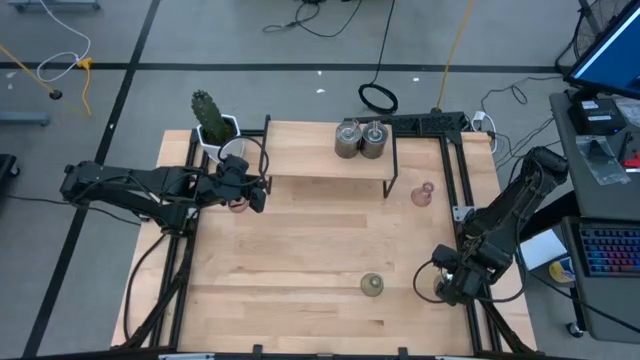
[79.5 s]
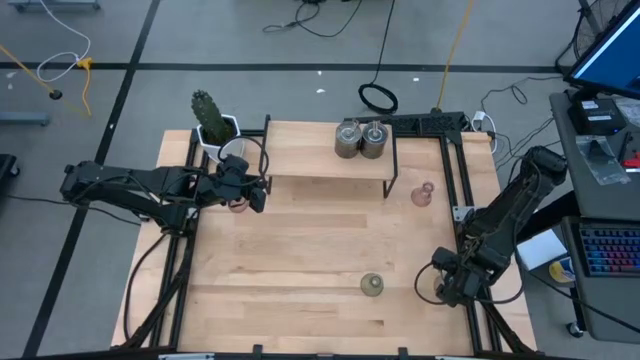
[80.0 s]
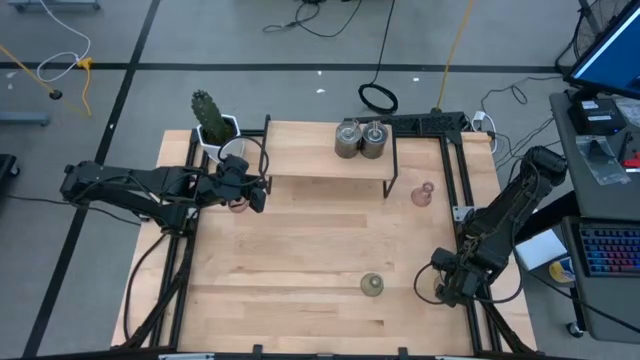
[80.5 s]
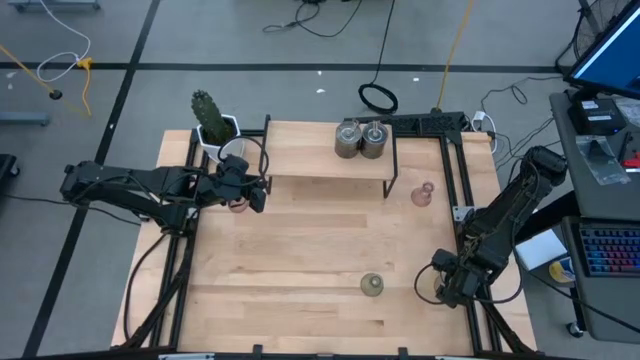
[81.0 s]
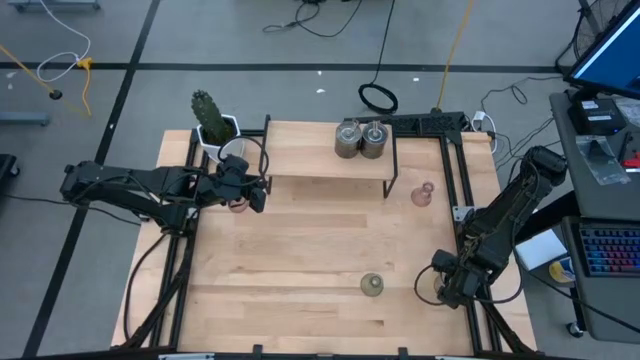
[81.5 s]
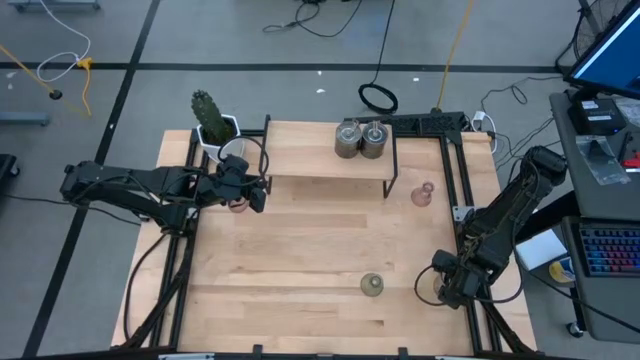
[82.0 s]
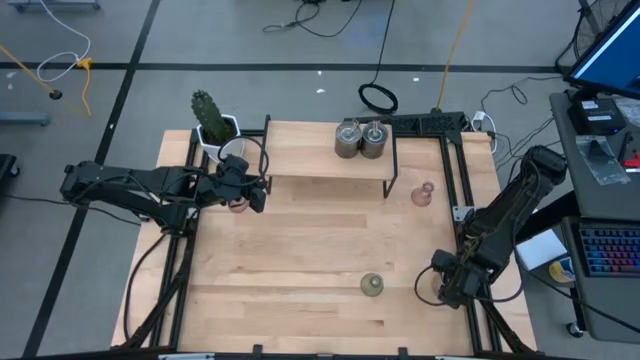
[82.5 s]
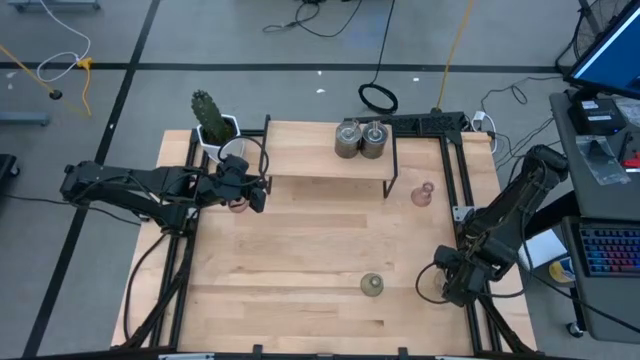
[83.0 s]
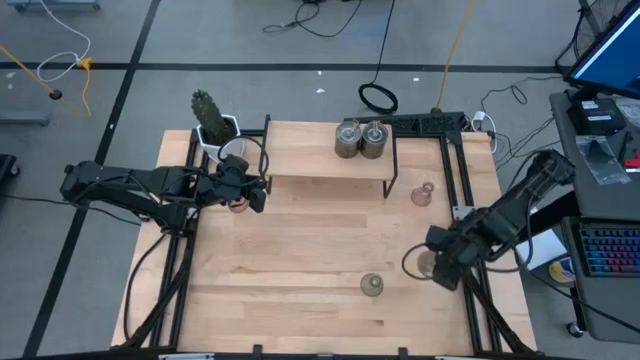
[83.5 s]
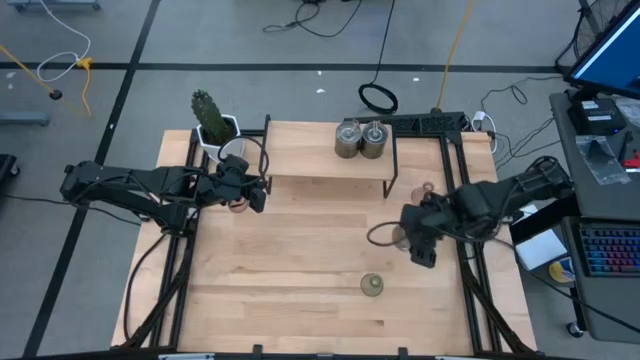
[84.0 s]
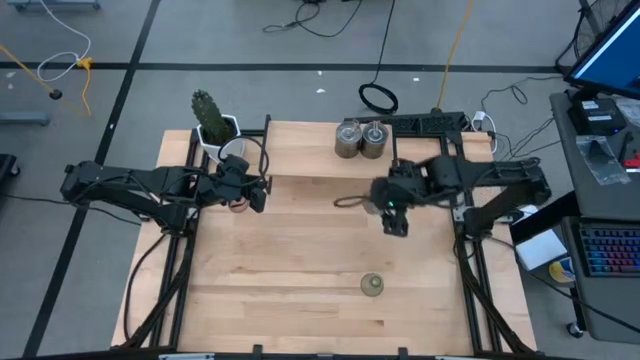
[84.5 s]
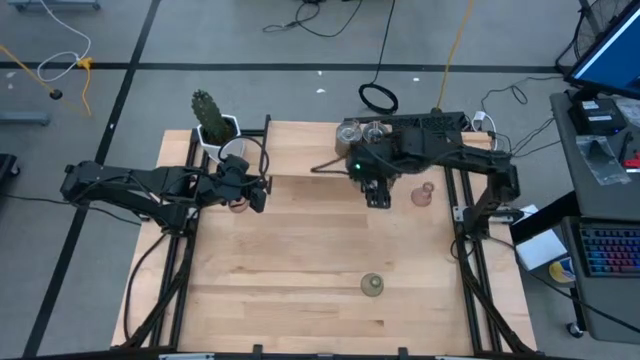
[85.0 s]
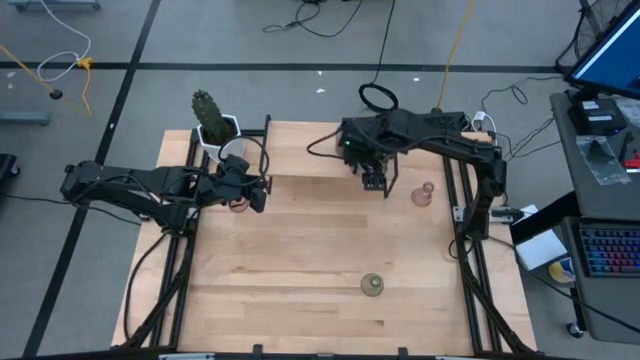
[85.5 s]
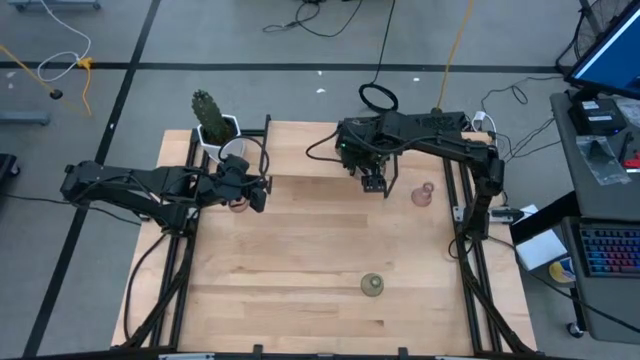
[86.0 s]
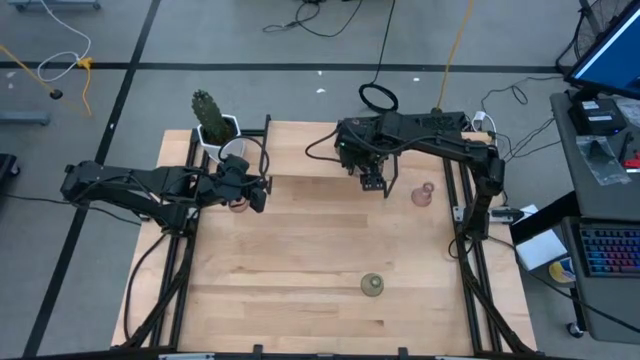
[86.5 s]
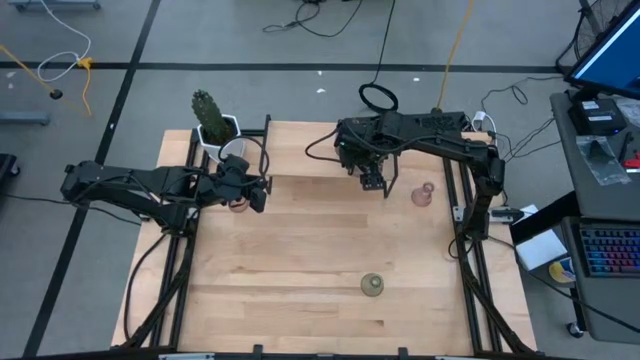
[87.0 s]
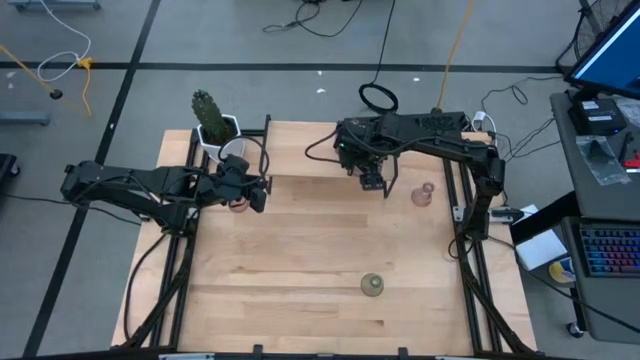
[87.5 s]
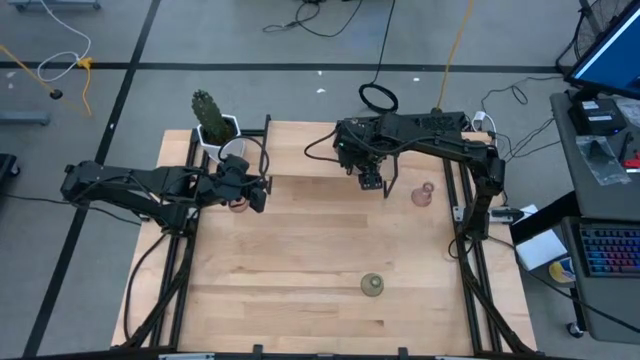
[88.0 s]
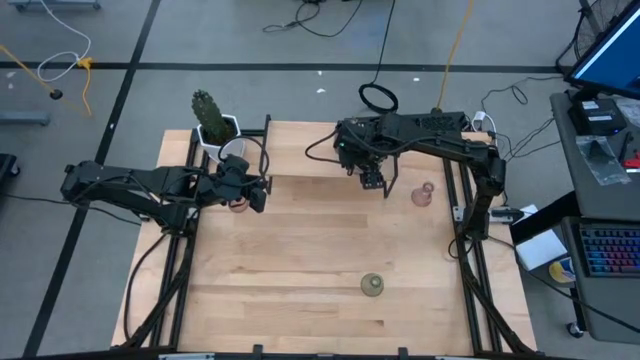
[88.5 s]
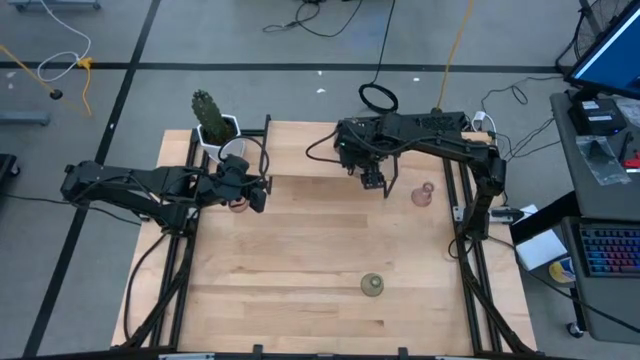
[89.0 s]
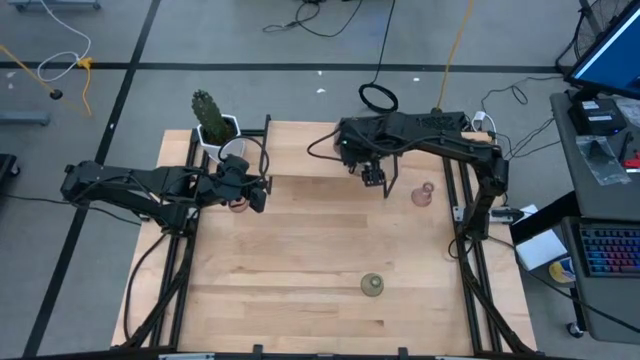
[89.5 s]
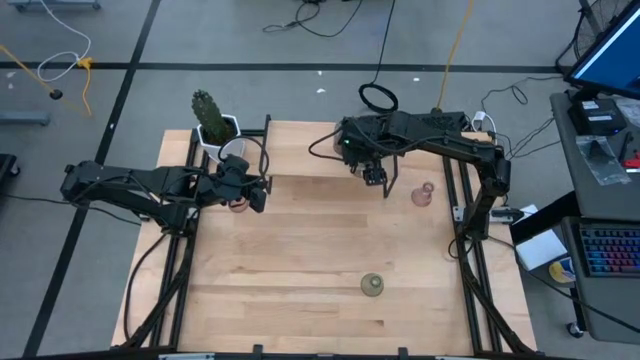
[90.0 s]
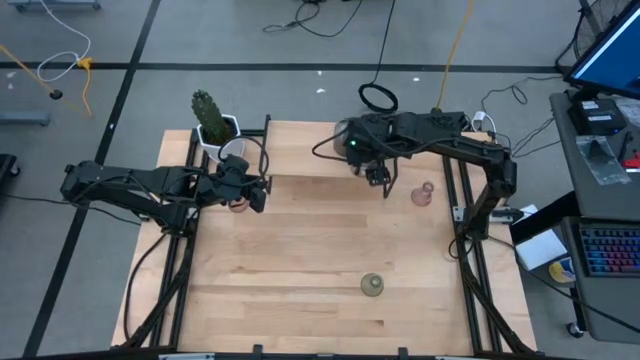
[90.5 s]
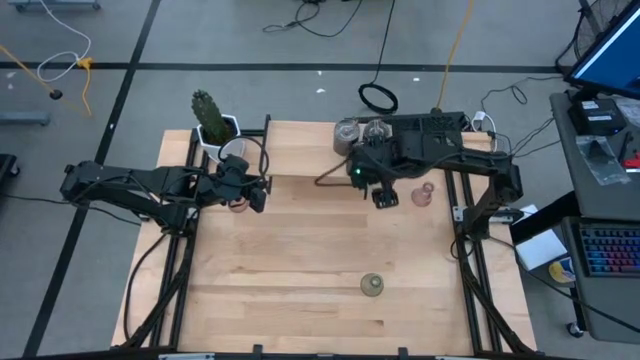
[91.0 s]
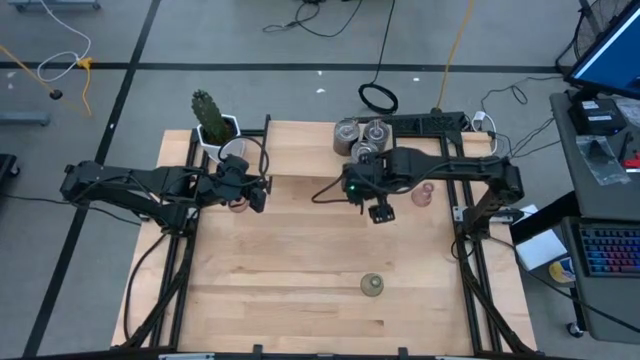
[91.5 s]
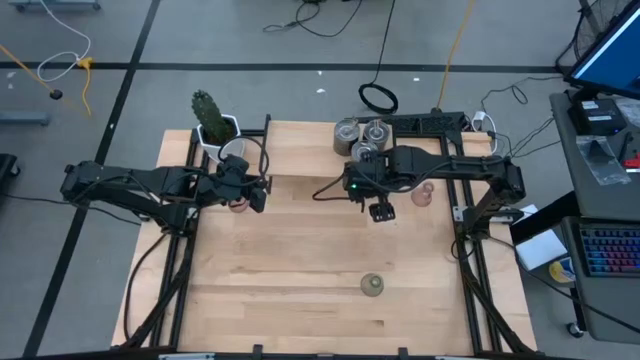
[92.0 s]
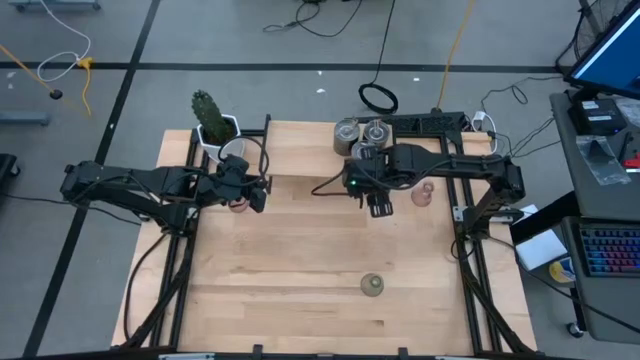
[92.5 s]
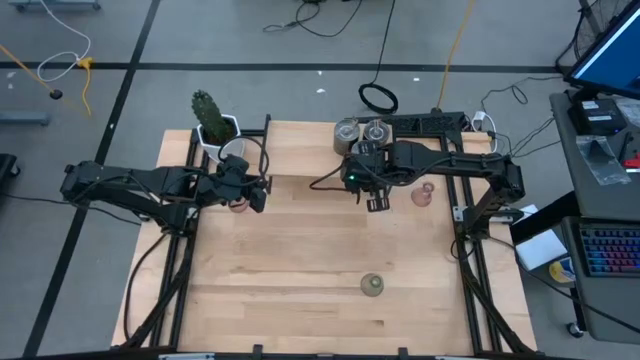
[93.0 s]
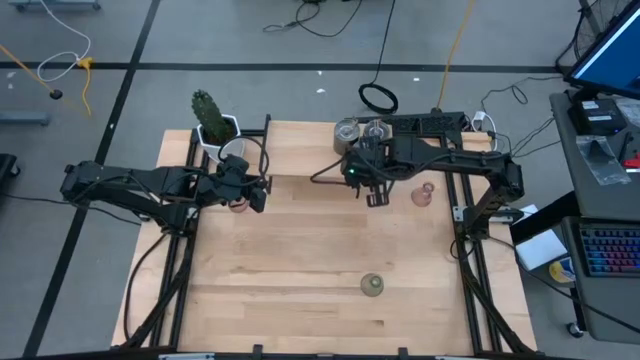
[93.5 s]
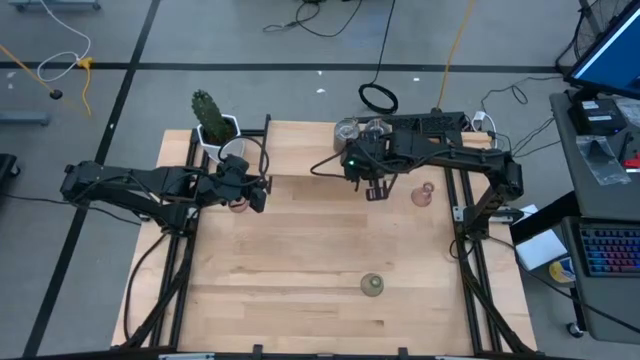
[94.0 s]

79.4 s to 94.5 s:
Task: Pick & Place candle stick holders
Put the brown scented candle on the shelf

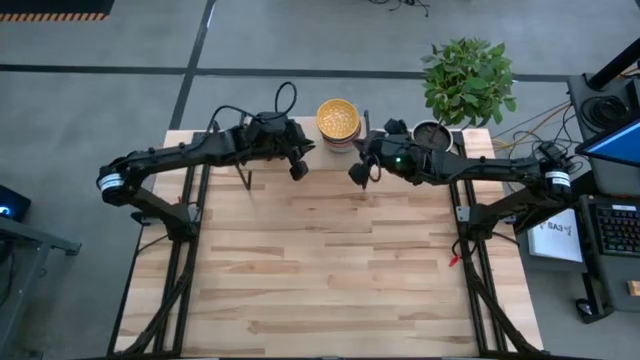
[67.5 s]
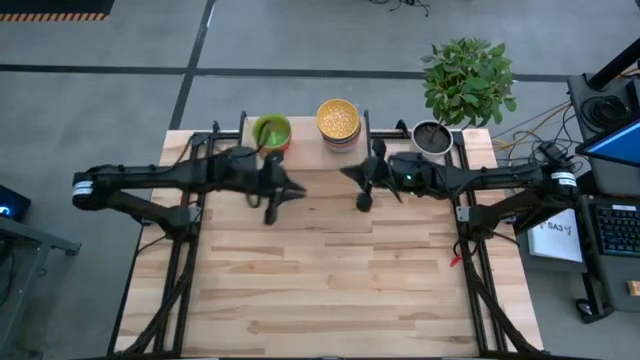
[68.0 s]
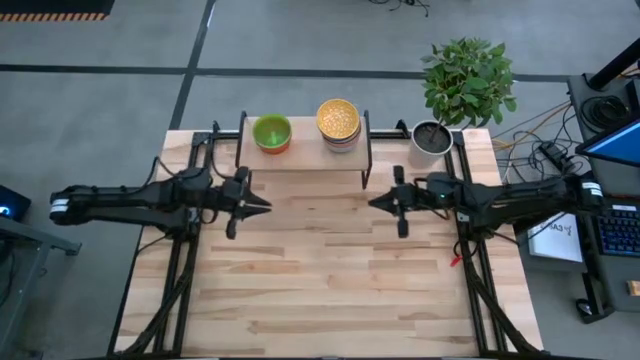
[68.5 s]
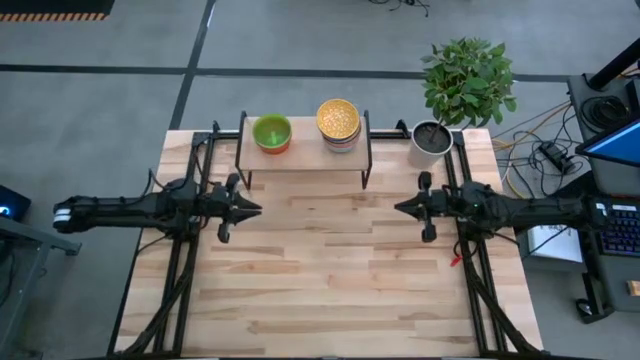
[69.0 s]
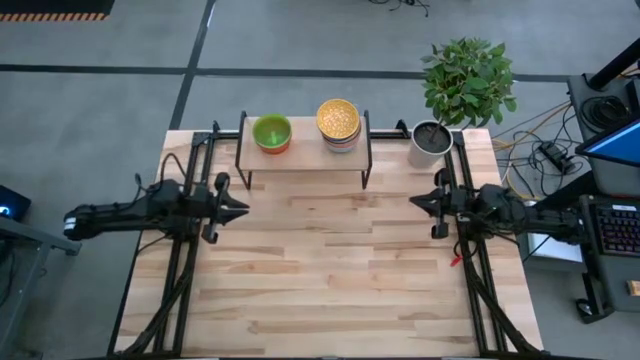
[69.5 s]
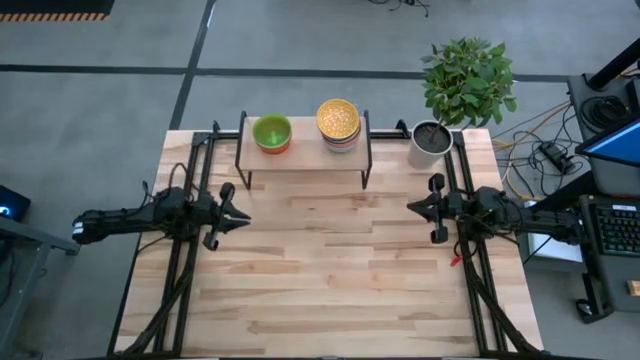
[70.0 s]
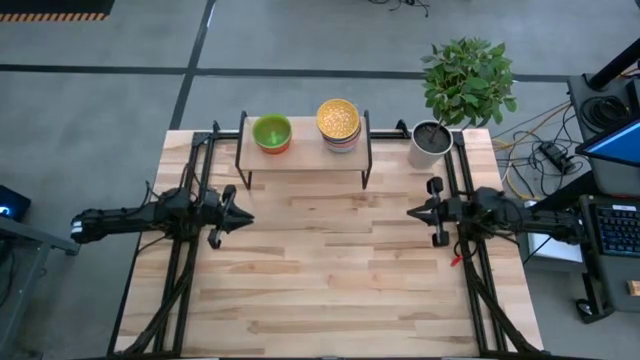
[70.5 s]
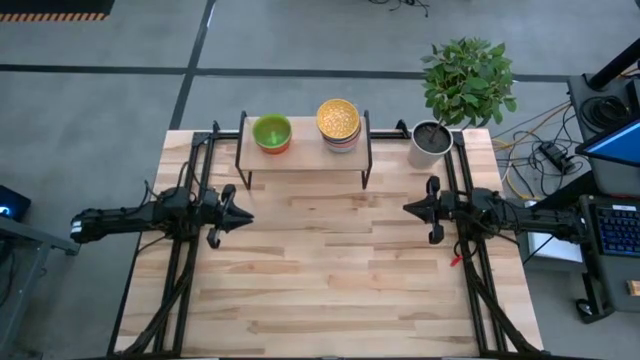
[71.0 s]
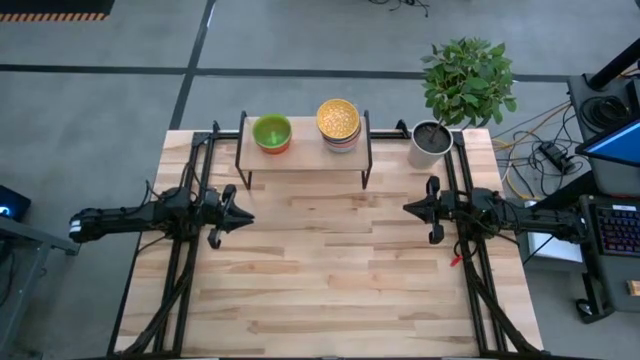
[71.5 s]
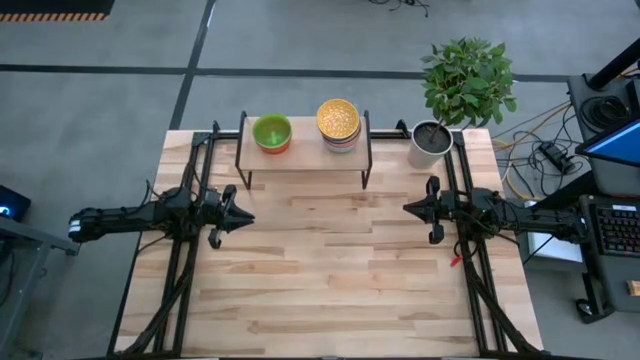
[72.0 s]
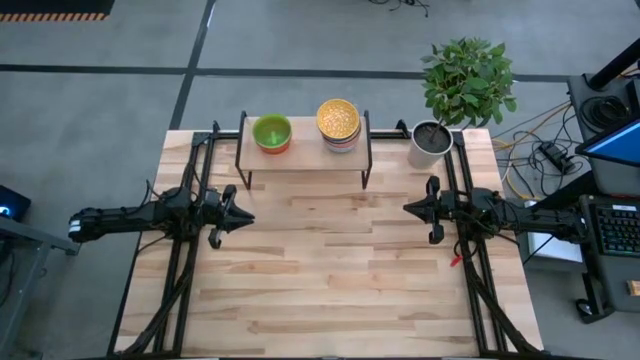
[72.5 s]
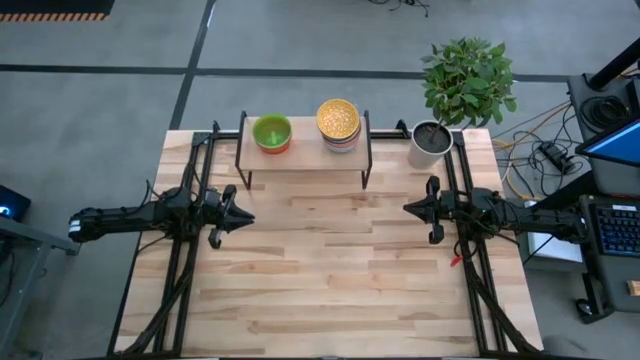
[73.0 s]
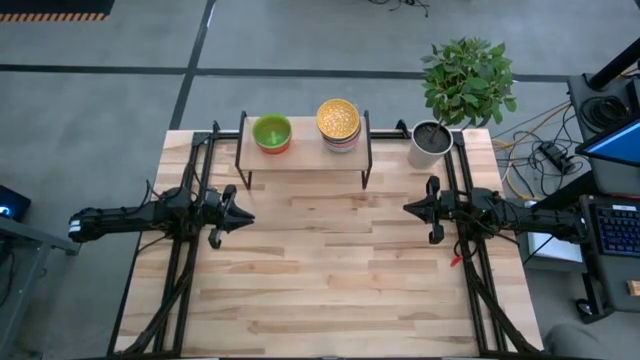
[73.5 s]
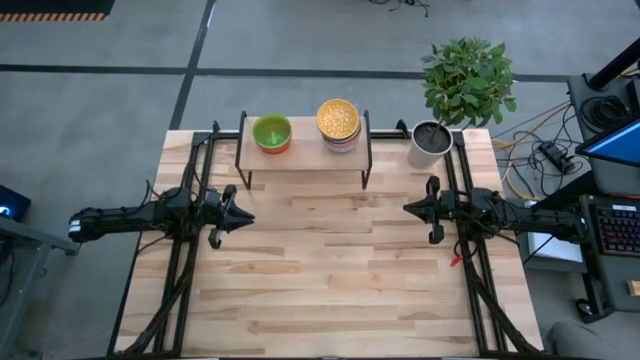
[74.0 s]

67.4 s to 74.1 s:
Task: Place and stack bowls onto a shelf
Return to Home Position
